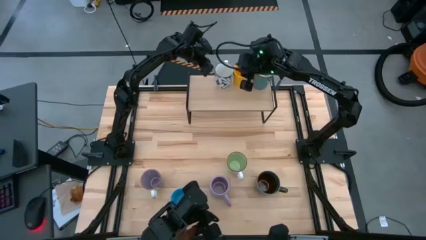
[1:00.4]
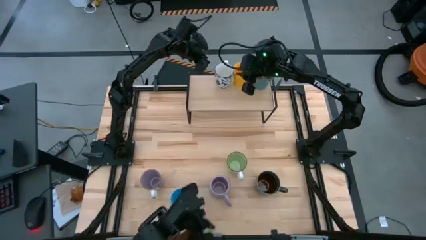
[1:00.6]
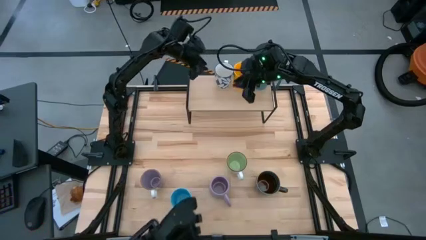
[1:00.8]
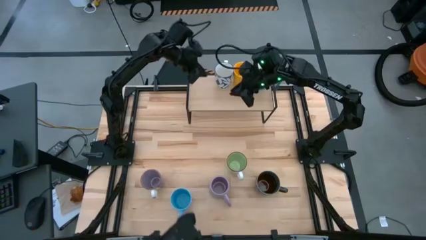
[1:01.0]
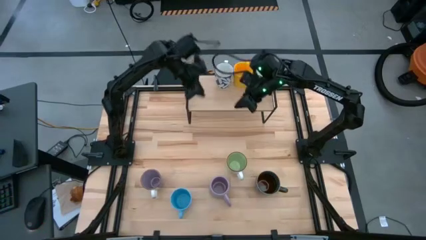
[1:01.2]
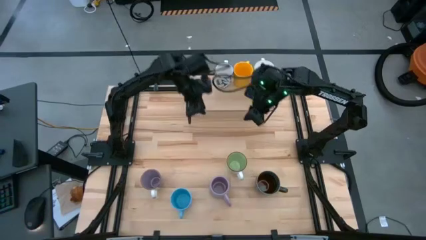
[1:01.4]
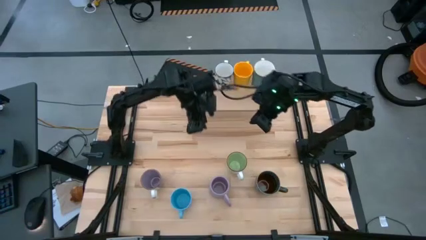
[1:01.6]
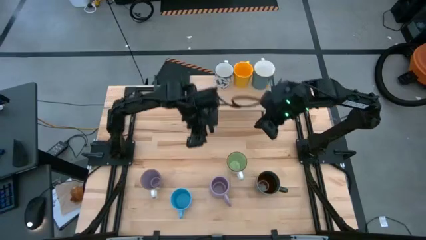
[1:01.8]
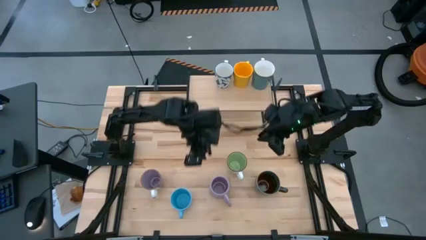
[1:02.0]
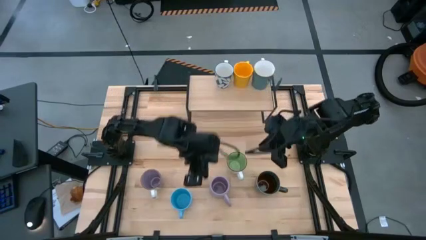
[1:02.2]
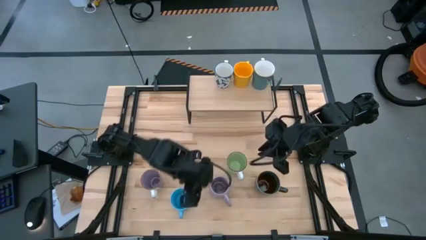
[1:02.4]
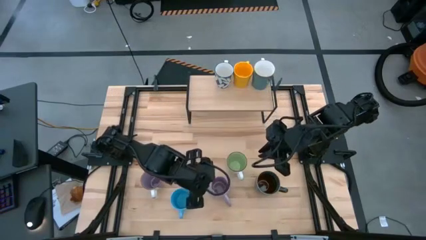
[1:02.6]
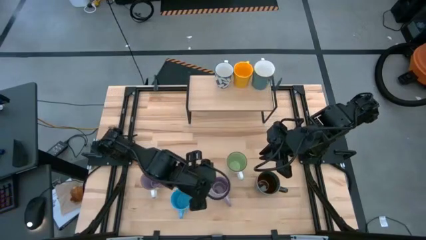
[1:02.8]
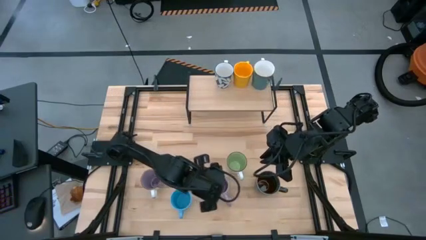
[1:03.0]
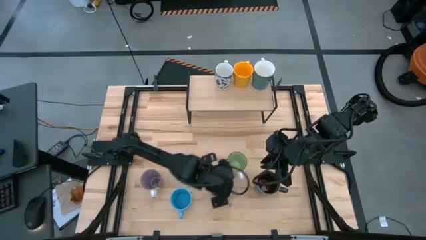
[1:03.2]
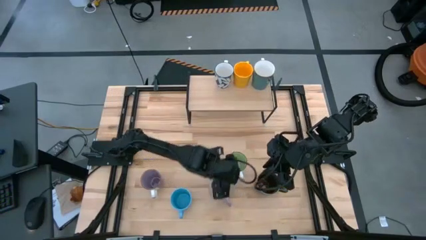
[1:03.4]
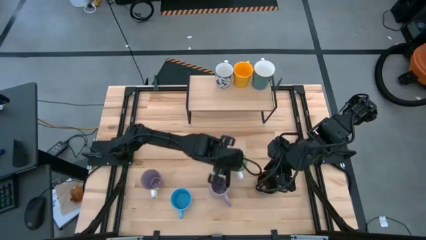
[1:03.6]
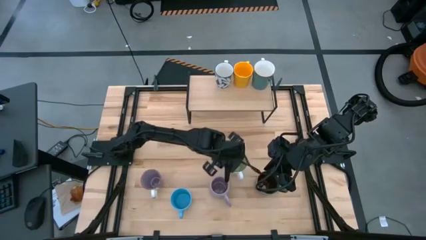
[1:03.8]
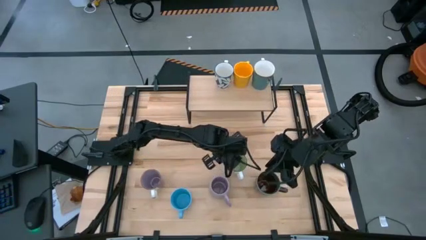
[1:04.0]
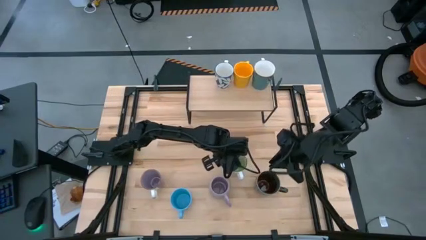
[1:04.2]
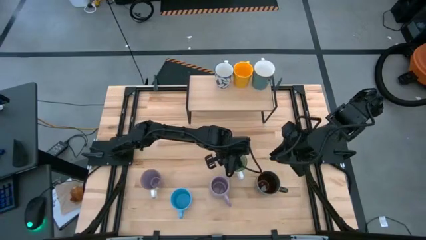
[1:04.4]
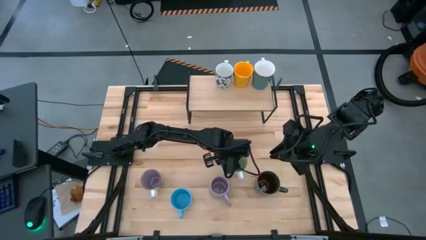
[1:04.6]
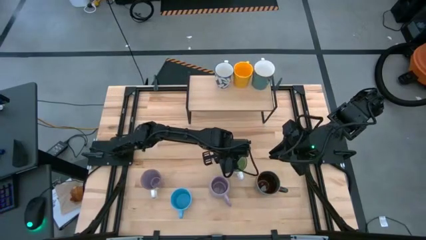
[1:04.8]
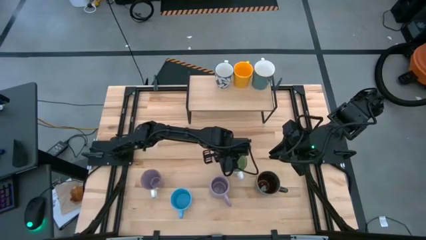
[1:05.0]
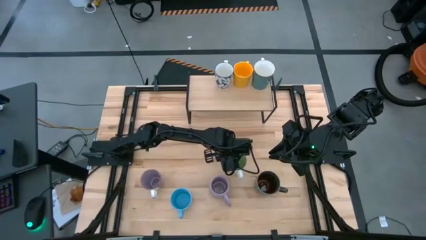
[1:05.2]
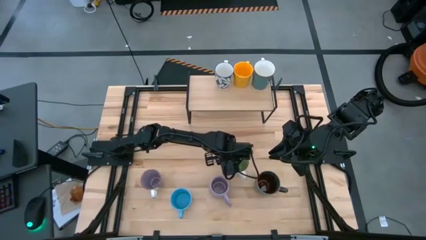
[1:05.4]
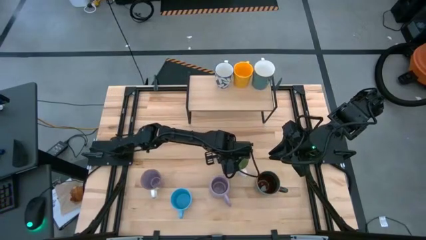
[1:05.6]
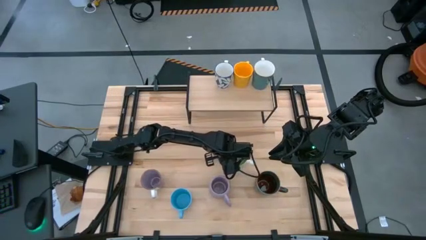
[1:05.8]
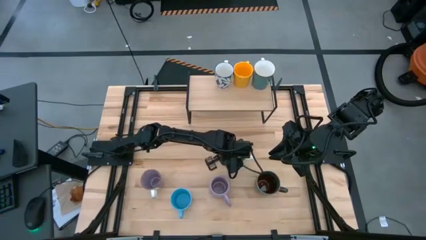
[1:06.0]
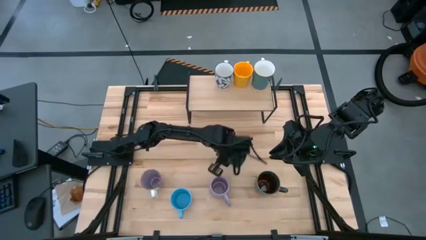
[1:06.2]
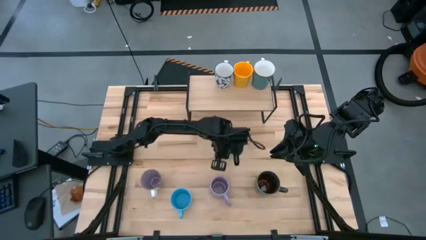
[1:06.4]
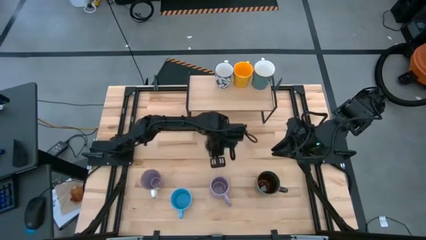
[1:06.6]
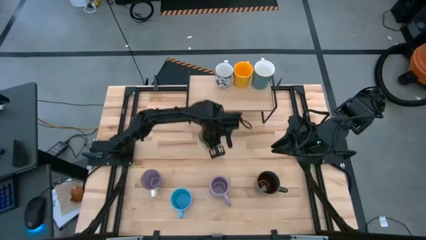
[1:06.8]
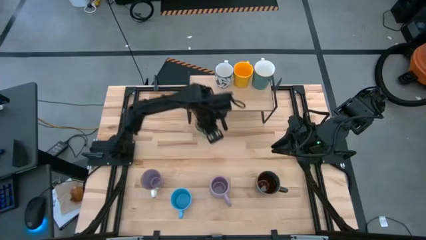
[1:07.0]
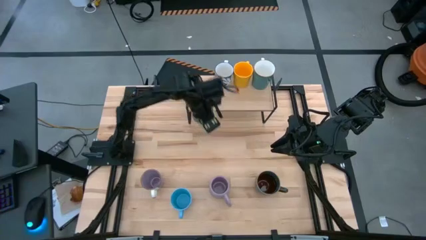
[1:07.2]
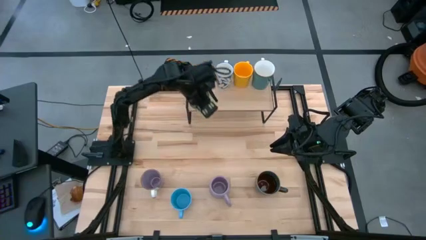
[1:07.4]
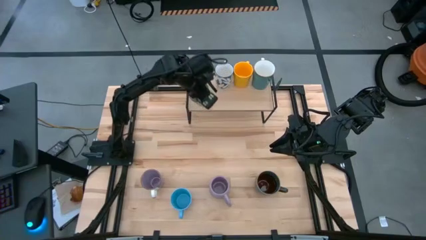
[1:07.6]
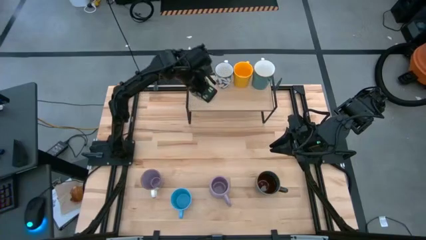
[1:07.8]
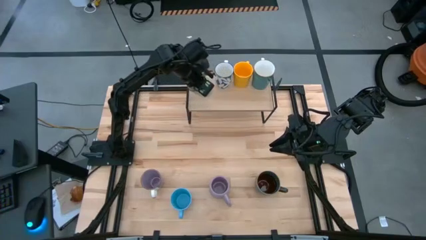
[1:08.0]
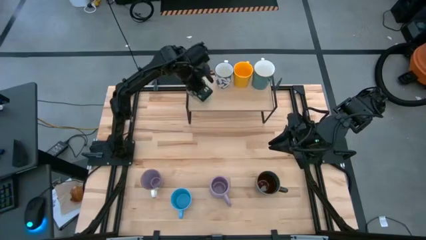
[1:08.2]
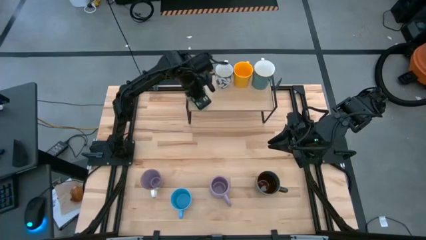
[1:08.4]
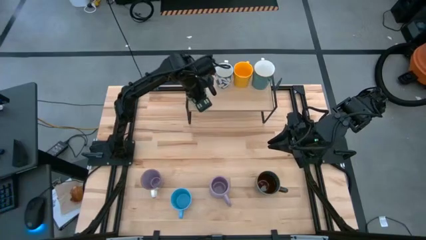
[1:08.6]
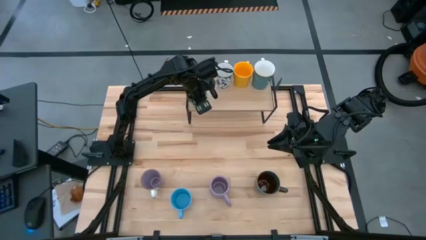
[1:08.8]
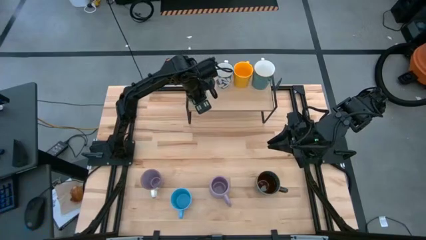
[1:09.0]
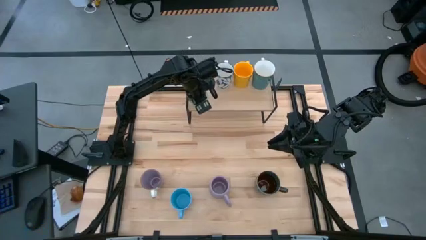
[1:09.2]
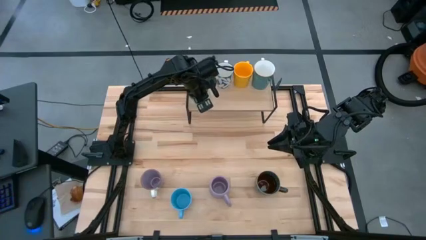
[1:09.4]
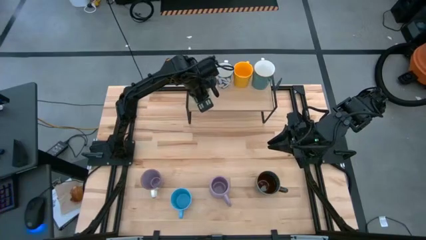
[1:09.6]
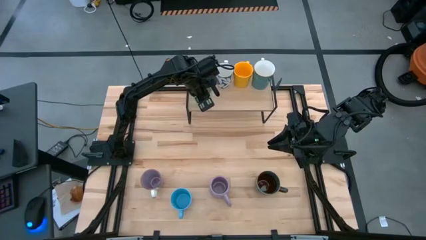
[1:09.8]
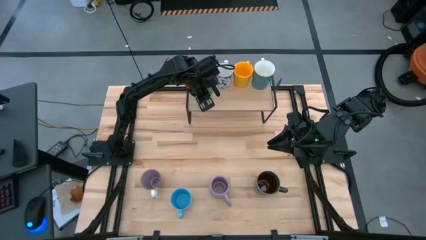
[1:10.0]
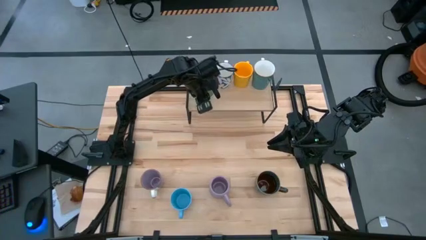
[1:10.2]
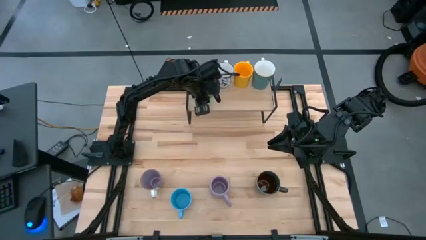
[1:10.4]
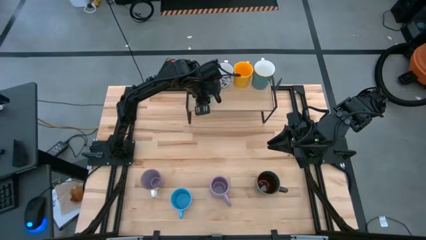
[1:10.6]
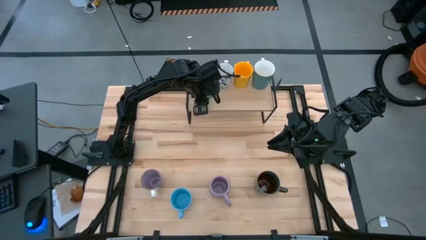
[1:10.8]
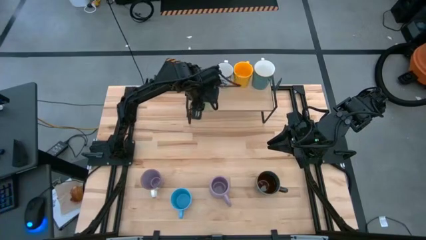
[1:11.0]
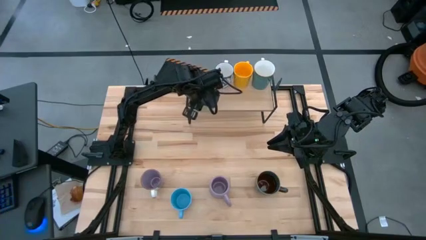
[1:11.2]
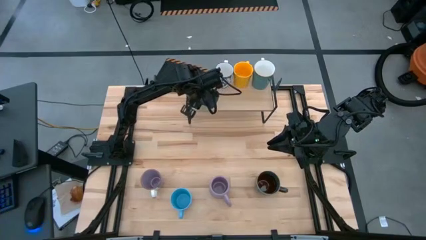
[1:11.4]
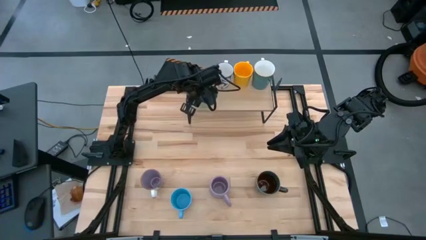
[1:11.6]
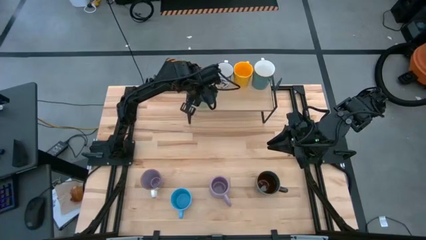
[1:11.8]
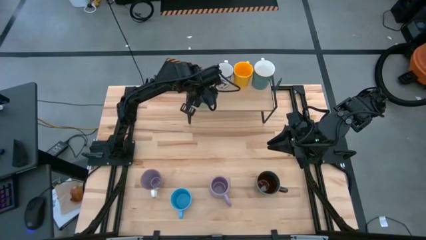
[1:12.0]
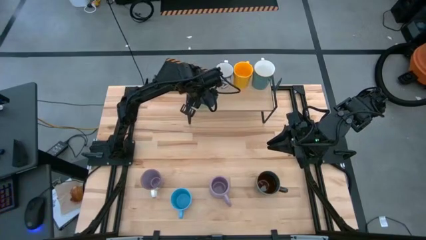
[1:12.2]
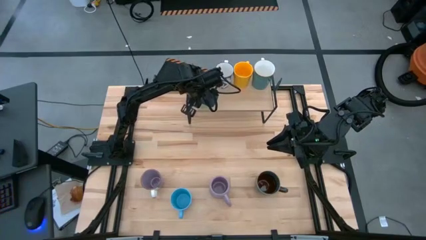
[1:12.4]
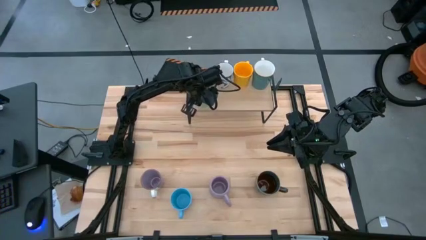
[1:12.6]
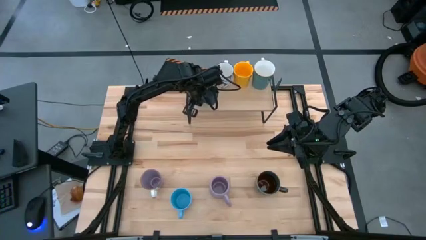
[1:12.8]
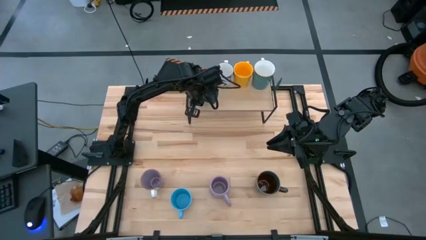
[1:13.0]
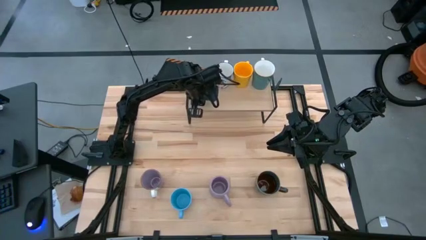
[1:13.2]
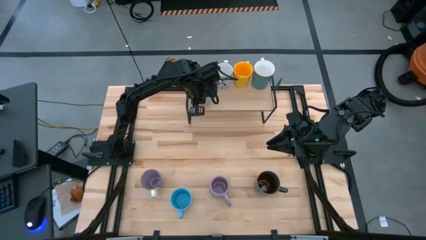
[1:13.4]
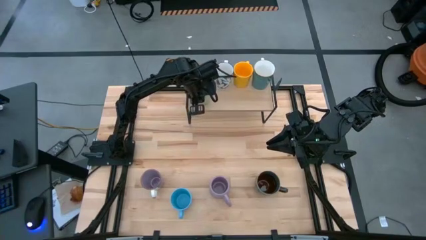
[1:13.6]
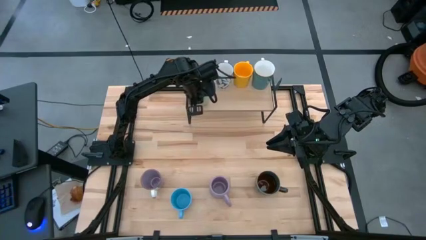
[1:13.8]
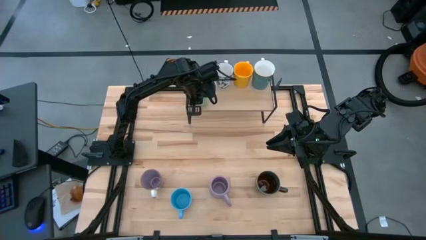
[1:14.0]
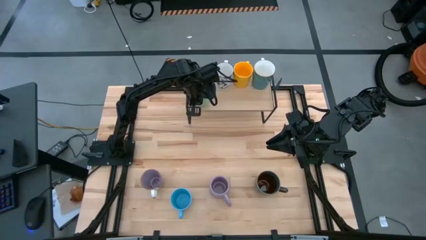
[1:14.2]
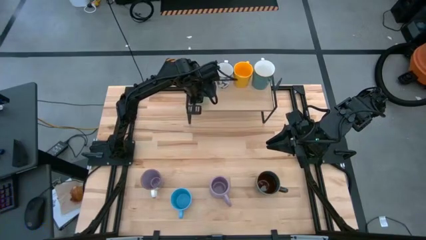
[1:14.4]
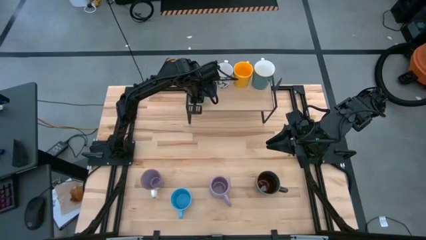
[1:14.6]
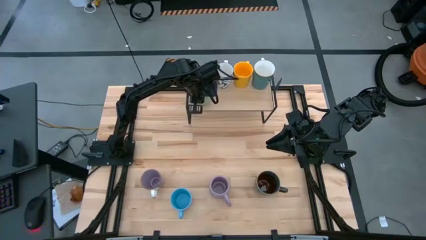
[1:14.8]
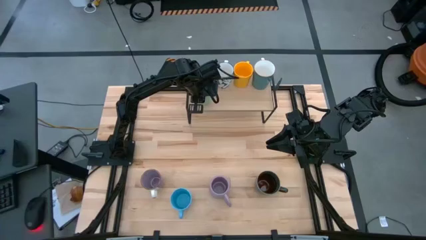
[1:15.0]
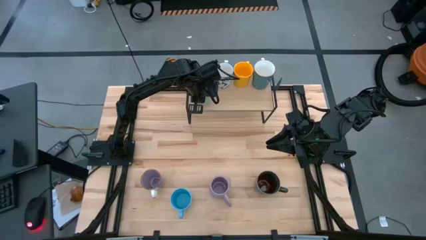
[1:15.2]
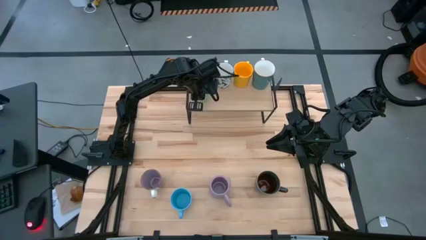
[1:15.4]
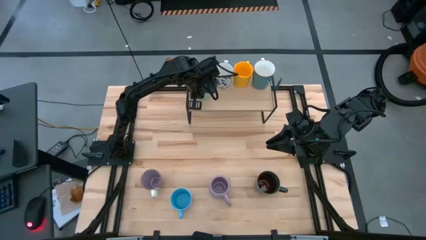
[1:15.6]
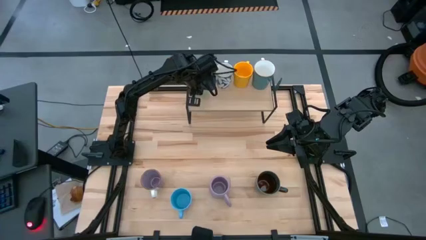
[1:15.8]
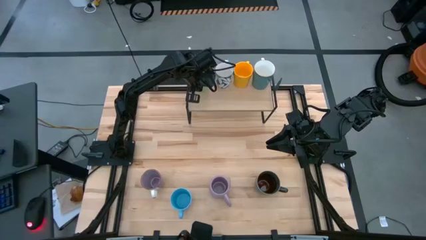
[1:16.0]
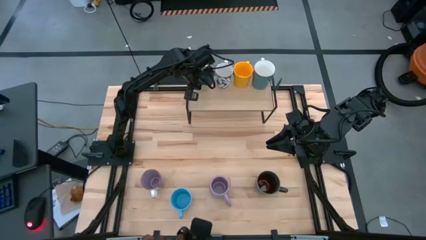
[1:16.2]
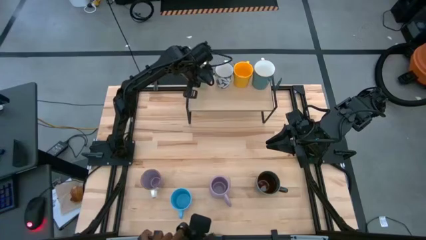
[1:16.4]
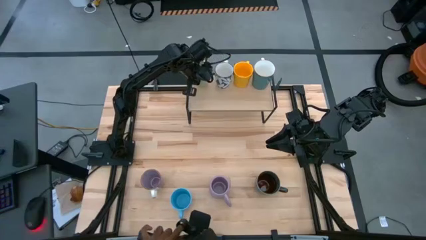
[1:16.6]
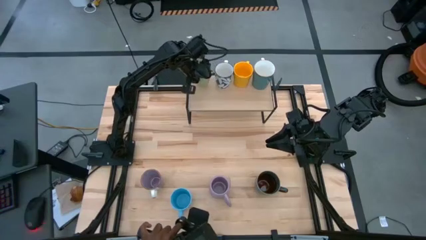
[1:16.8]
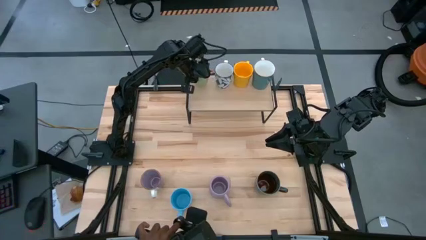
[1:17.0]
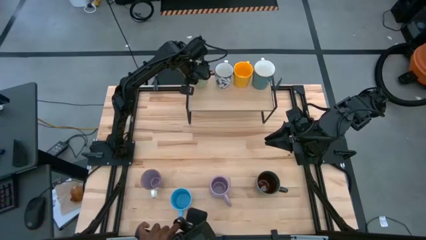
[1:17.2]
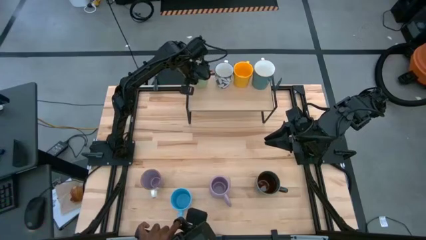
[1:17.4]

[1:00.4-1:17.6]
Task: Place coffee mugs
Put the green mug on the shelf
